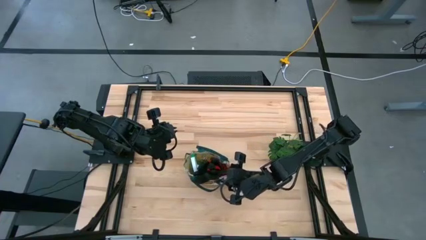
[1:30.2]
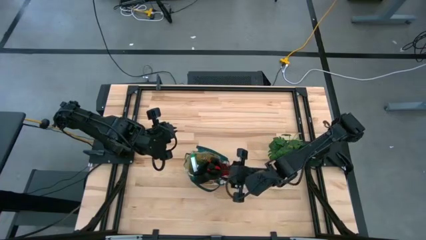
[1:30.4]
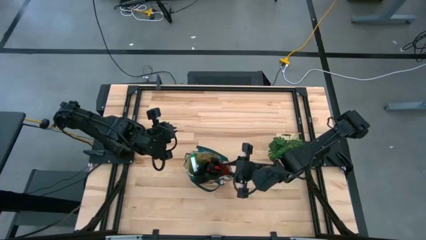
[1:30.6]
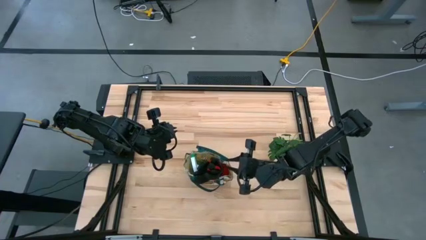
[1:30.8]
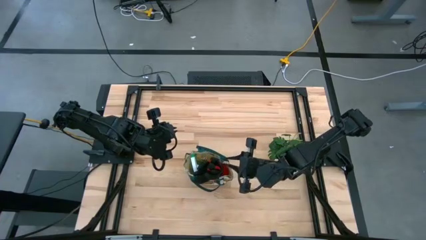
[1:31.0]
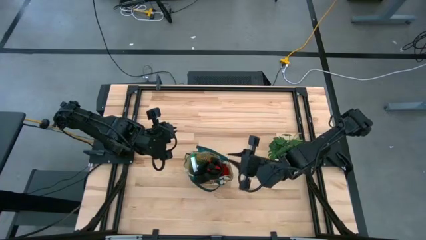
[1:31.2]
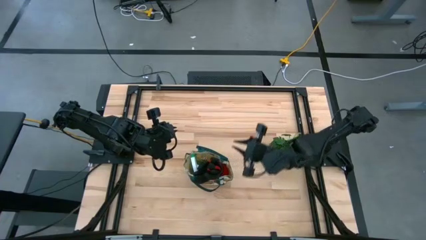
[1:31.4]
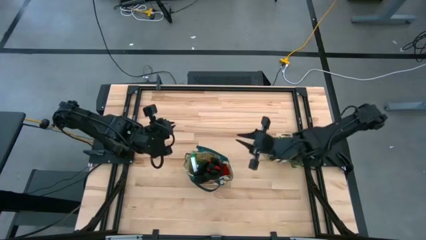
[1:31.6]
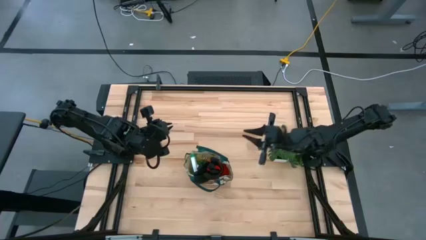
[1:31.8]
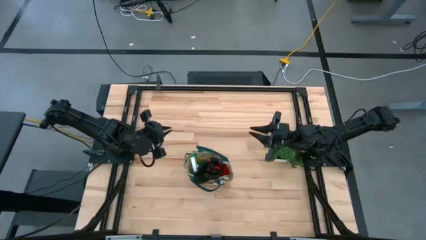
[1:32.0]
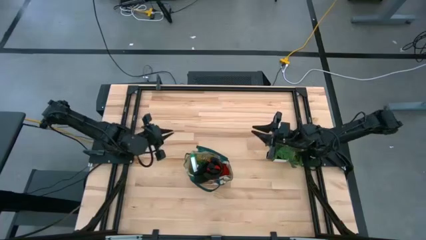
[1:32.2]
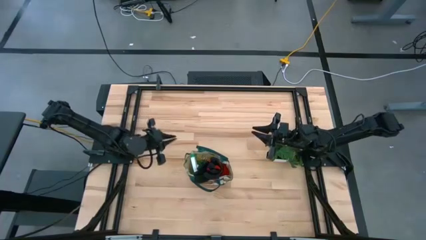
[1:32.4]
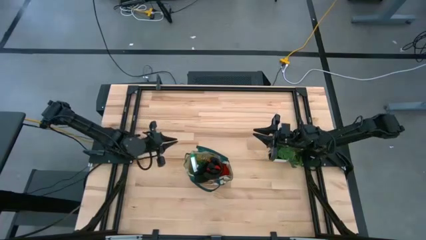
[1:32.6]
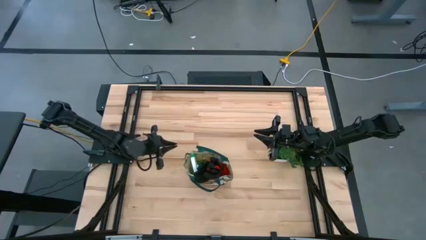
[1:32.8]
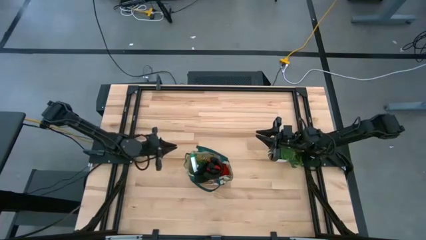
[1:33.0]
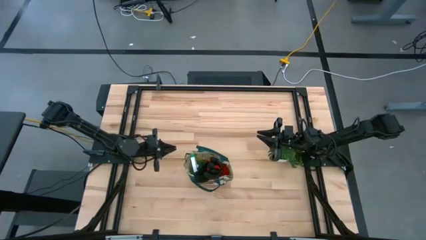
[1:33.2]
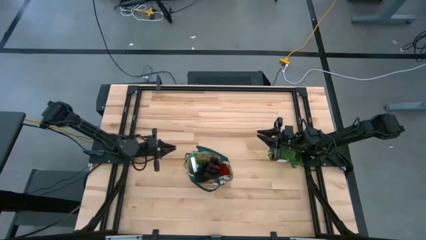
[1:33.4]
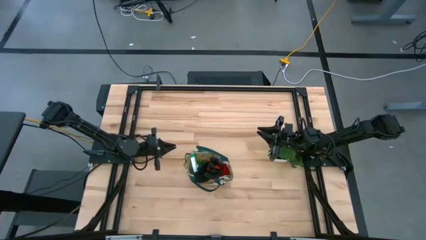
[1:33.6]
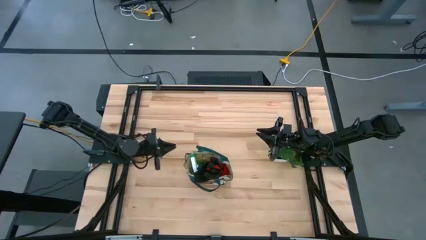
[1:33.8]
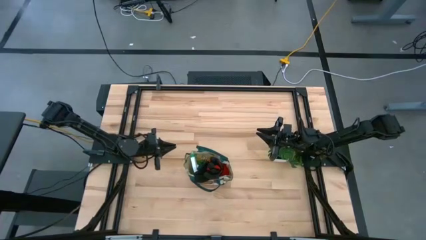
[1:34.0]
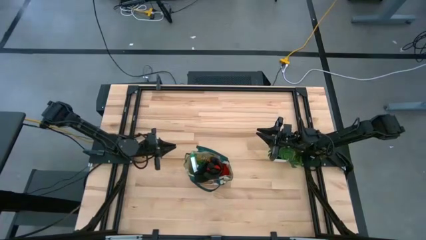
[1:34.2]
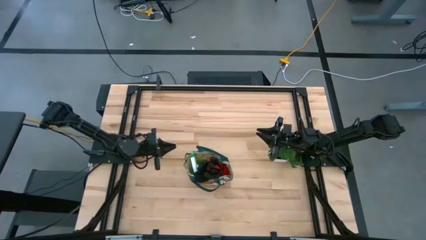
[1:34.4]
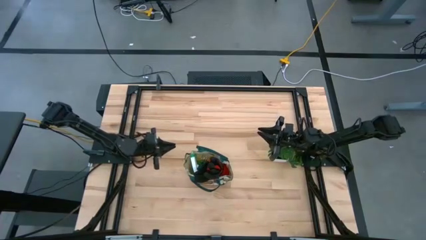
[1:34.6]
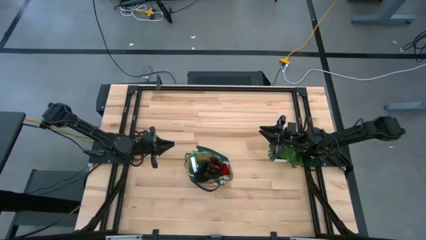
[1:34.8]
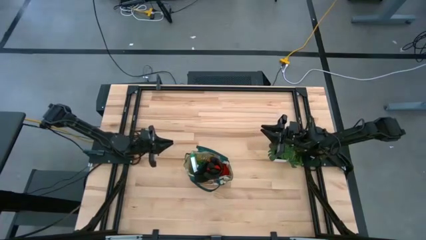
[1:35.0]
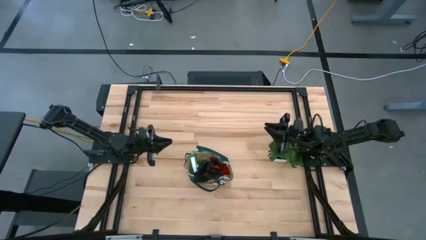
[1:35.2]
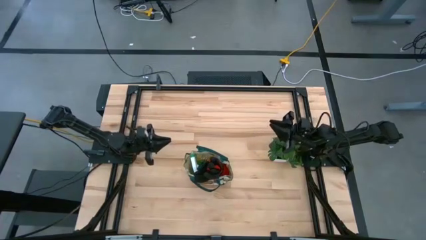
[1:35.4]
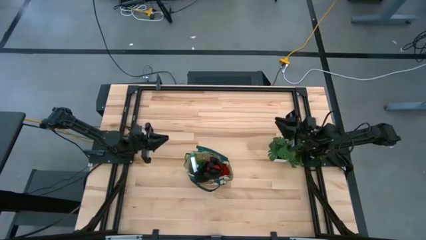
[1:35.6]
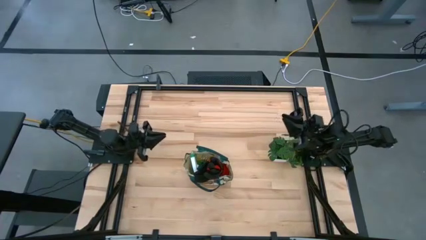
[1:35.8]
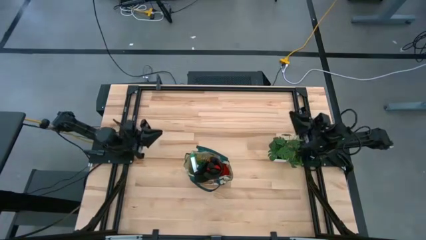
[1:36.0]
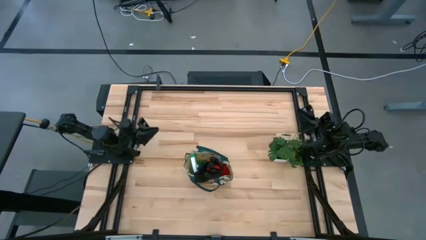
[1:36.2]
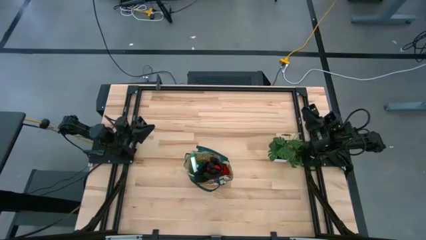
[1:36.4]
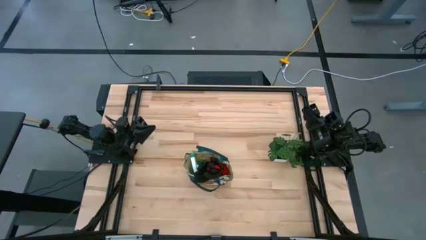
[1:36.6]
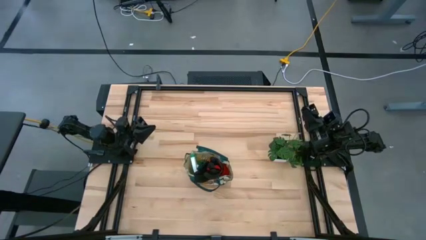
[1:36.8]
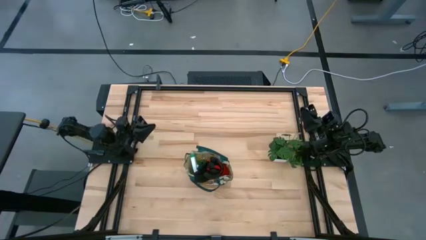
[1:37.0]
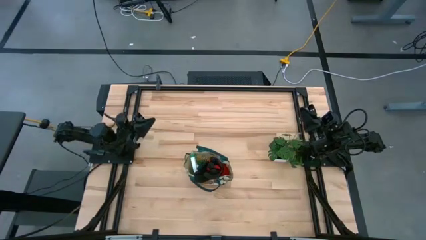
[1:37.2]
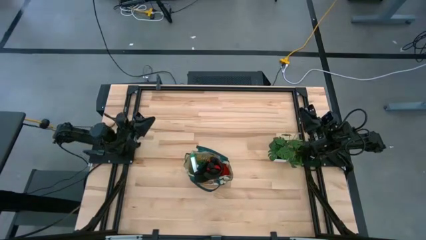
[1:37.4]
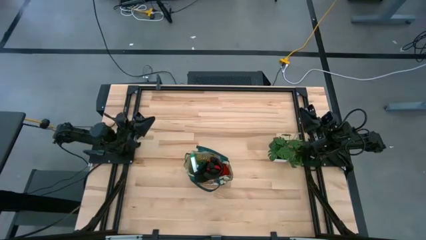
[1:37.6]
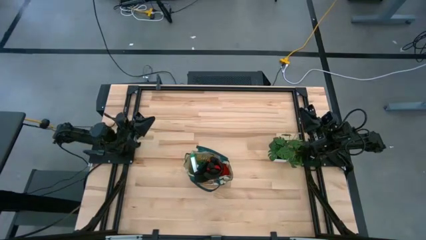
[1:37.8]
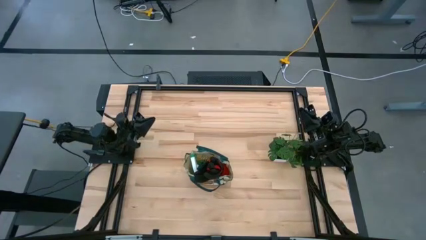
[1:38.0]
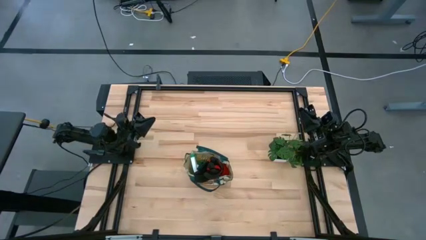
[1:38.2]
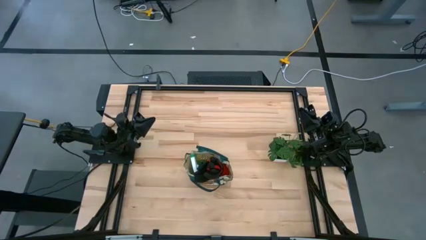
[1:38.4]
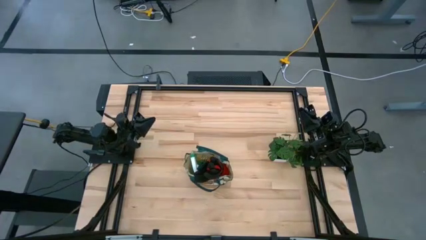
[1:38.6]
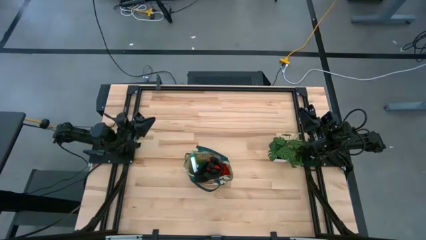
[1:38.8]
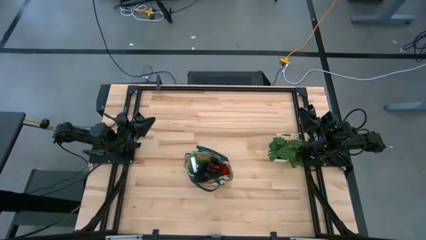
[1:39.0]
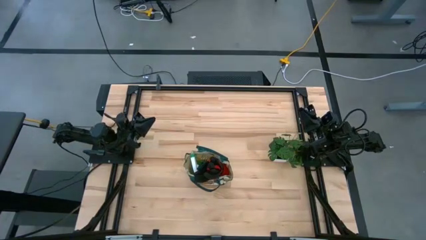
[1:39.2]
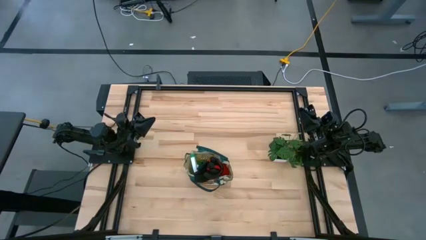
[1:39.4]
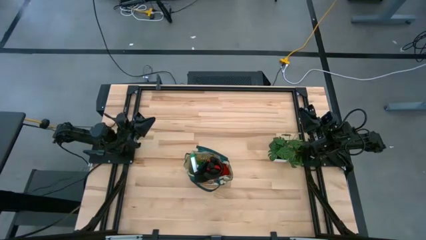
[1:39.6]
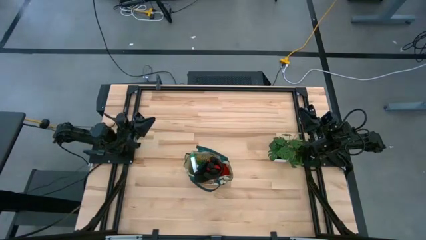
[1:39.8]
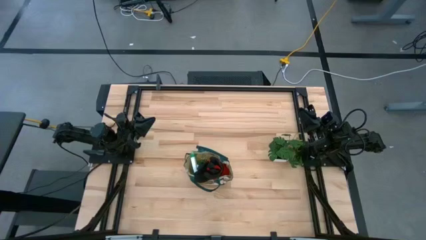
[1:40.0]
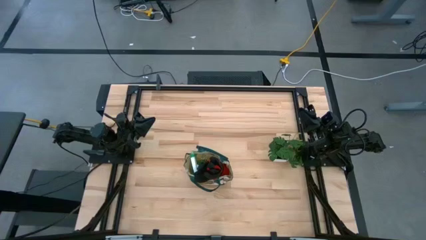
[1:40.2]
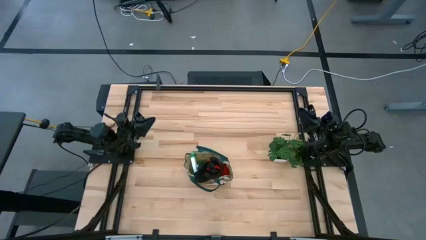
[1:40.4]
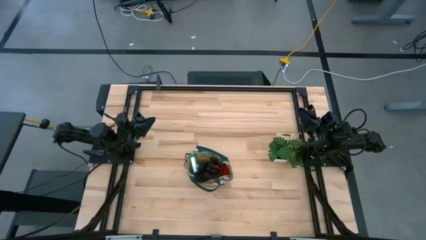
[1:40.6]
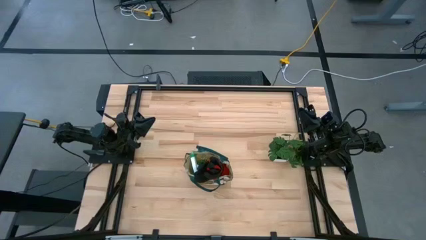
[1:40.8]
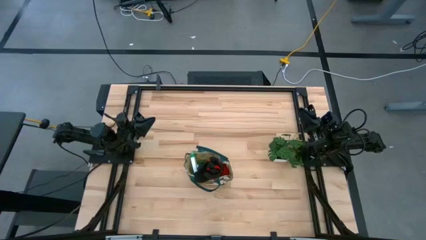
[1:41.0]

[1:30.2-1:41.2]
Task: Pick & Place Garden tools in Gardening bag
Return to Home Position

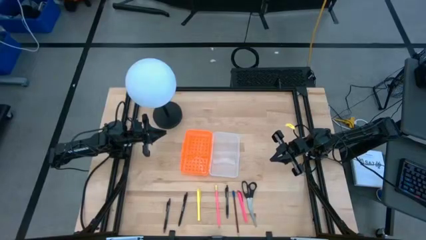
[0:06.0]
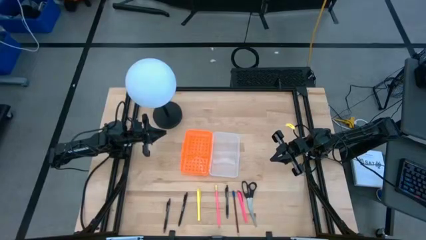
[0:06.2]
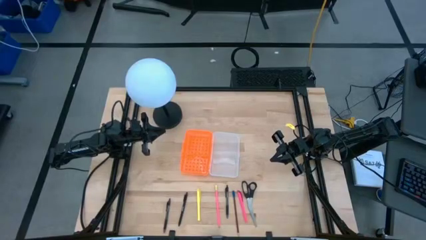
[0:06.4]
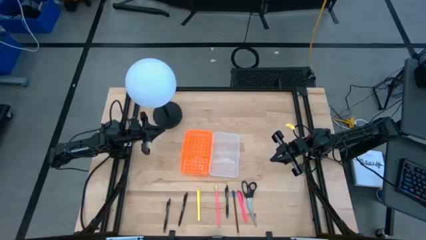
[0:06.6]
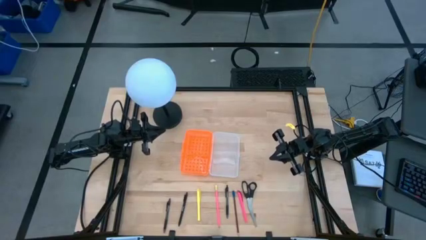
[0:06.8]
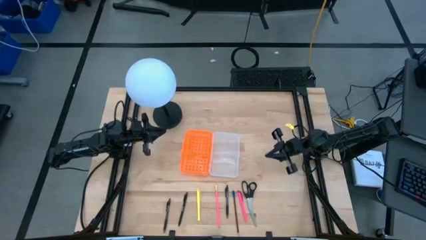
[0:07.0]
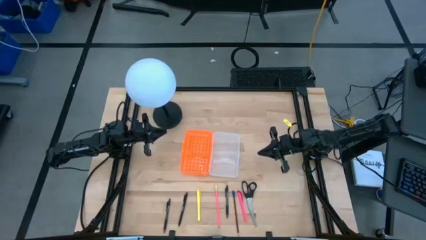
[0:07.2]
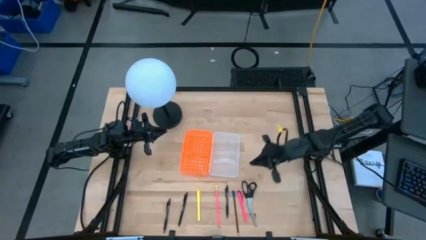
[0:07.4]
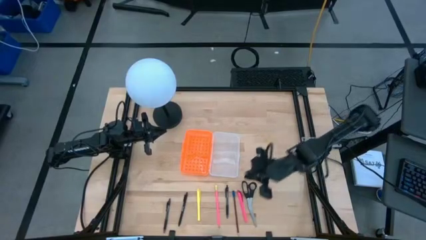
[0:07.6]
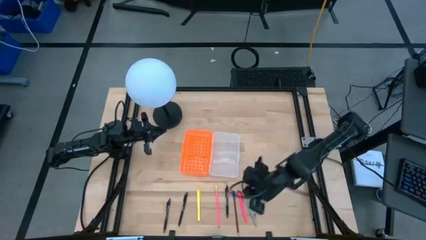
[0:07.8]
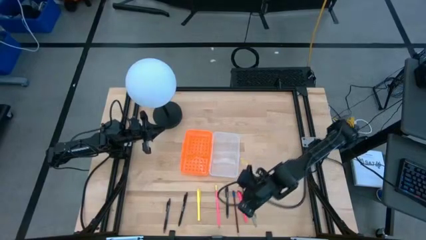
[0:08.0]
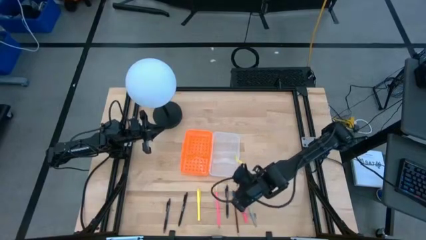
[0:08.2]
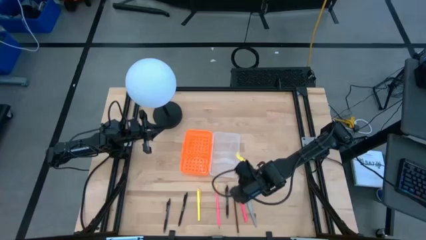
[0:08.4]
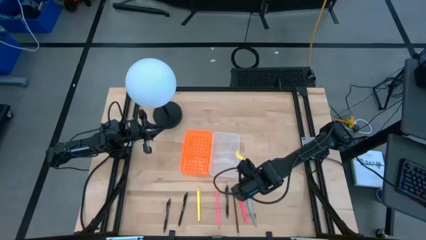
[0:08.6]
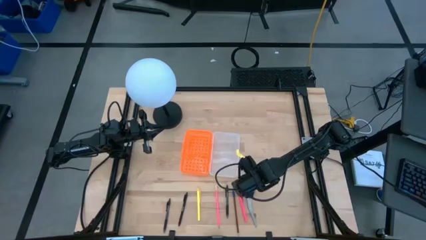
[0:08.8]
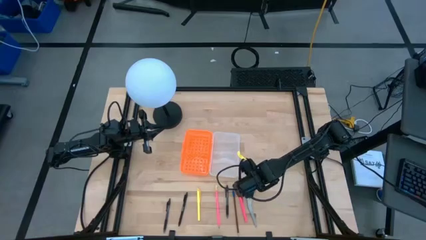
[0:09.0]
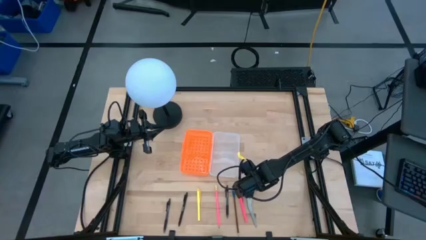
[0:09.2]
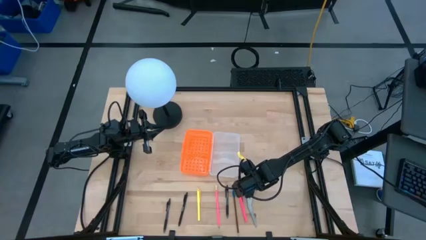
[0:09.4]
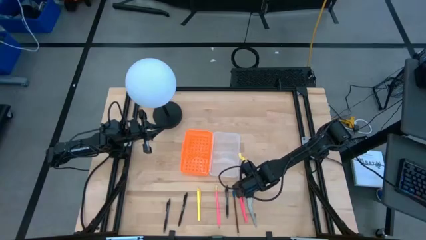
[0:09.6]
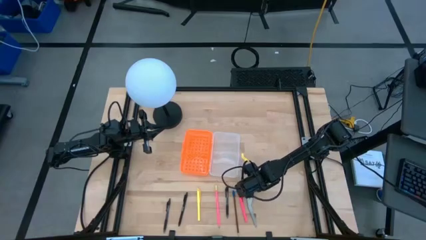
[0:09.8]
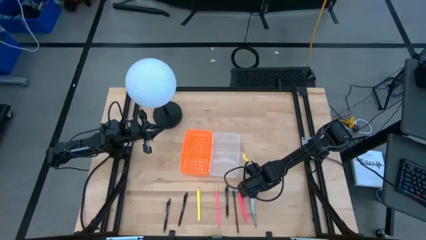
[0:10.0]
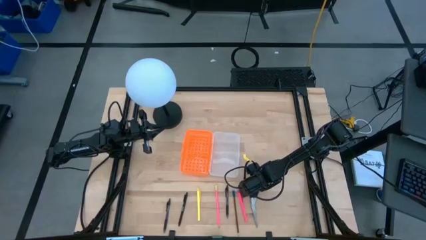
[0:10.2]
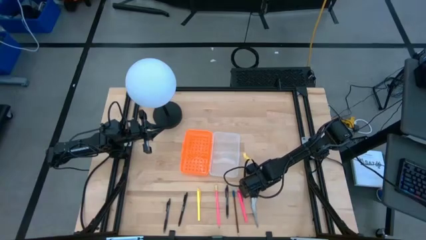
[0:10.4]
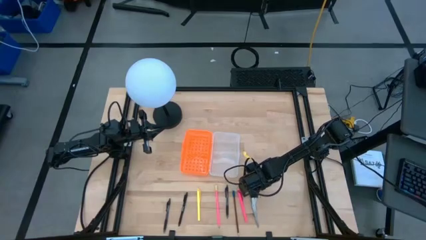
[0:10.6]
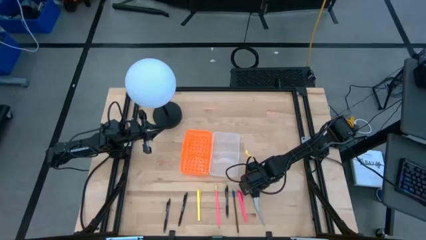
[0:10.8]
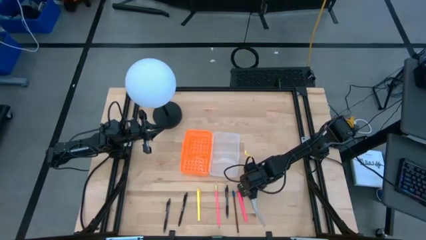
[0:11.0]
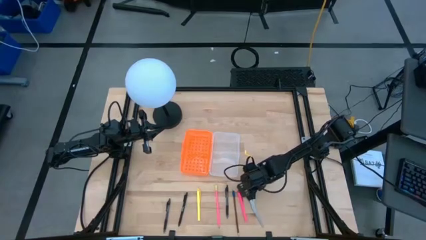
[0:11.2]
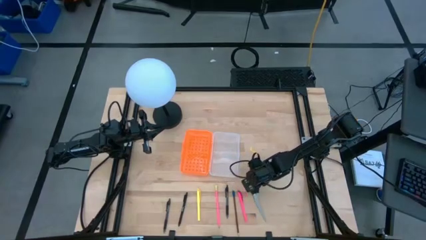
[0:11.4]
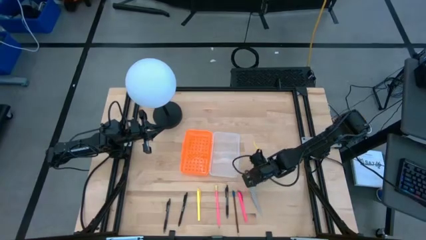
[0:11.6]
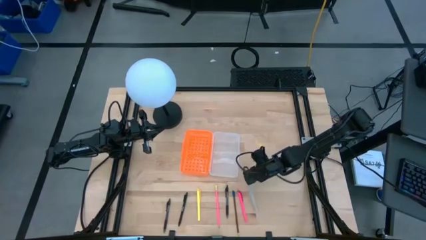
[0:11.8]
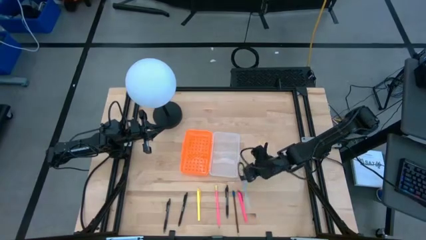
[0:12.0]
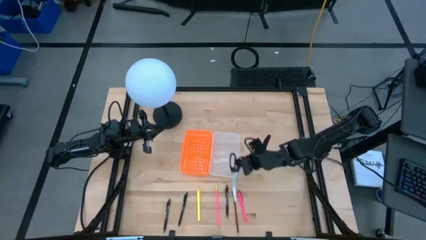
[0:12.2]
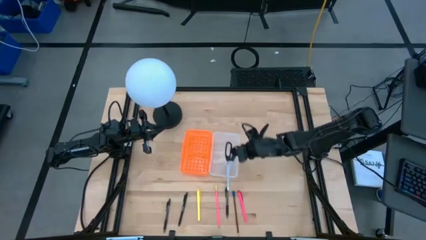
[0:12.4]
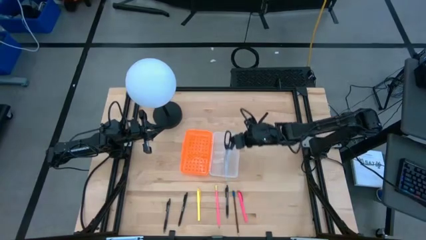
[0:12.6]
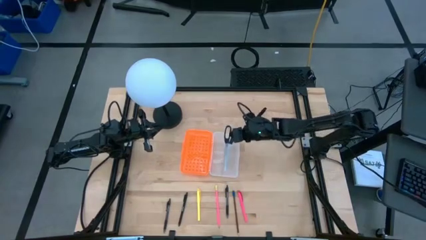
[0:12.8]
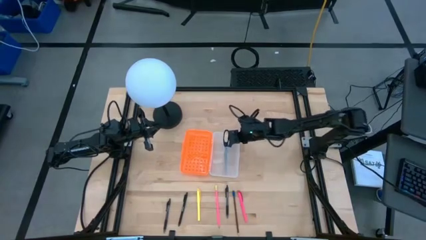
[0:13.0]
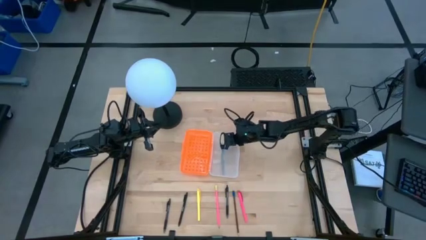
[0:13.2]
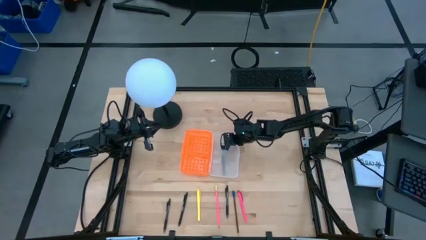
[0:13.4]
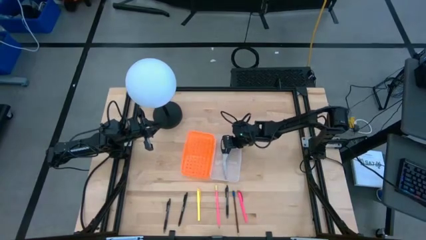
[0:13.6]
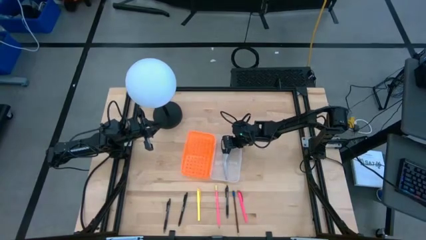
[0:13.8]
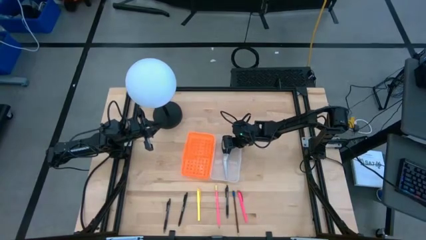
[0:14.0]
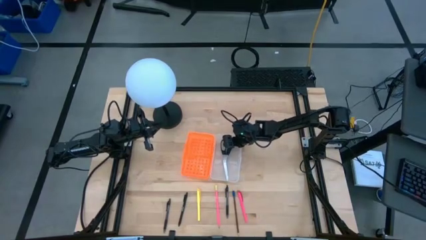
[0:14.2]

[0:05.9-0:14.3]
Task: Pick & place school supplies into a supply box
Put the black scissors into the orange supply box
